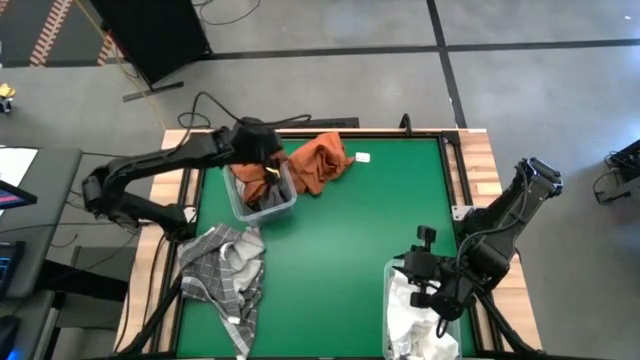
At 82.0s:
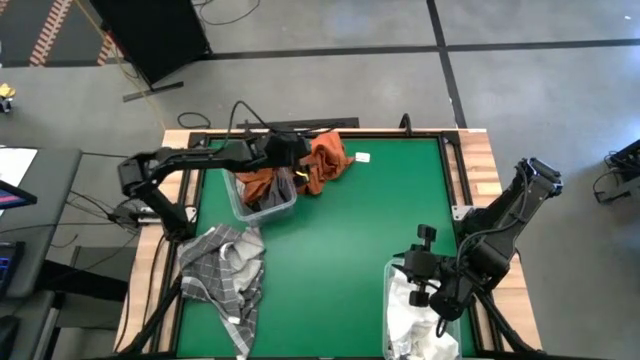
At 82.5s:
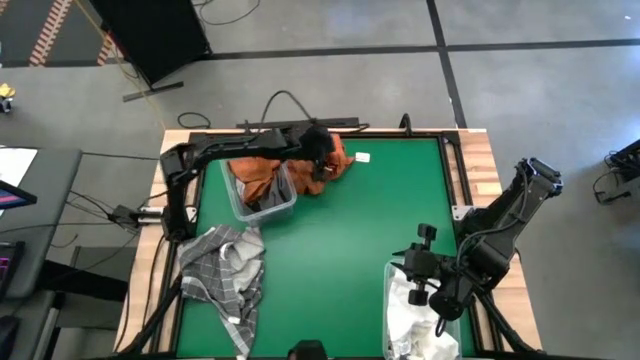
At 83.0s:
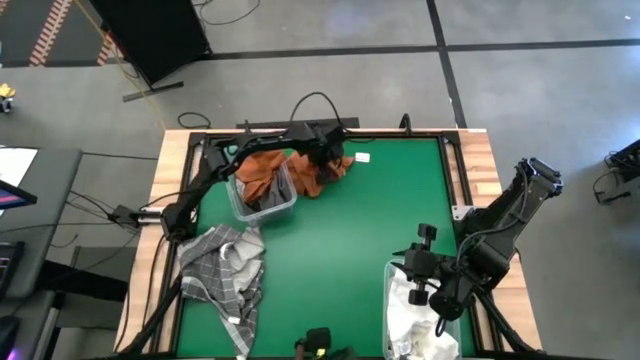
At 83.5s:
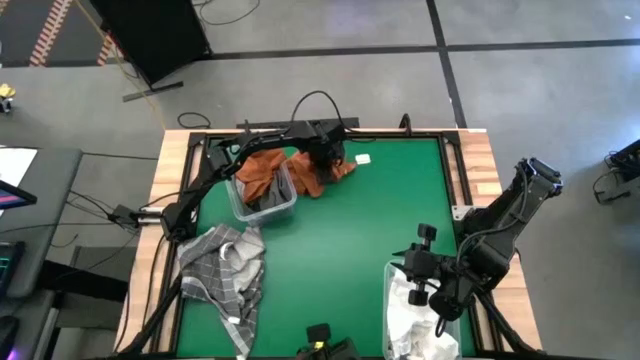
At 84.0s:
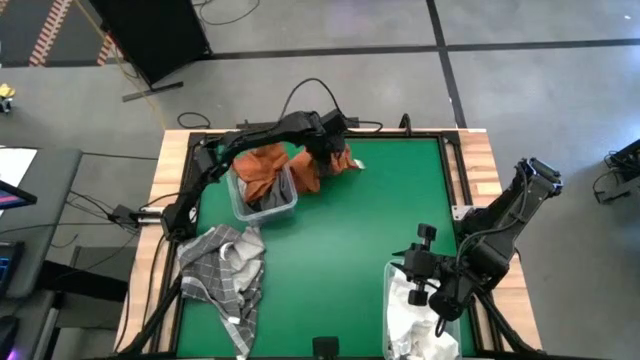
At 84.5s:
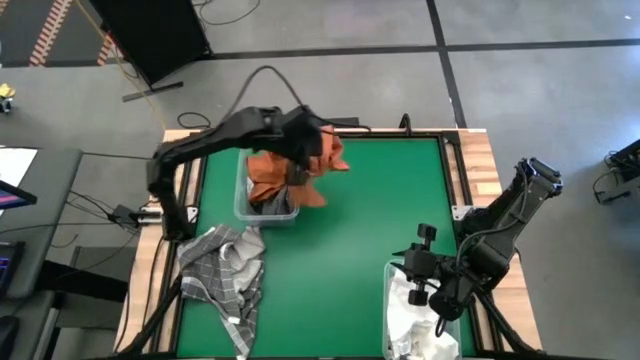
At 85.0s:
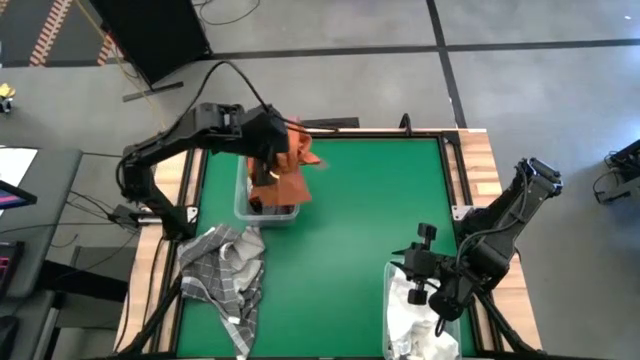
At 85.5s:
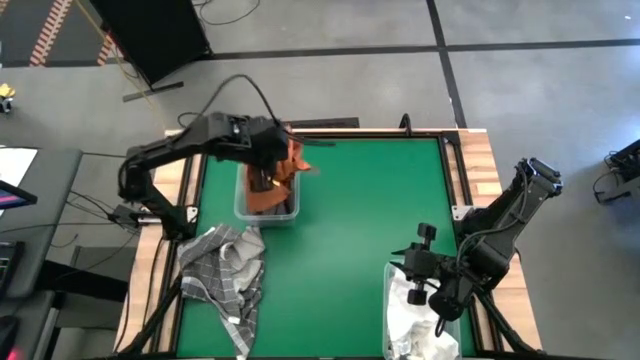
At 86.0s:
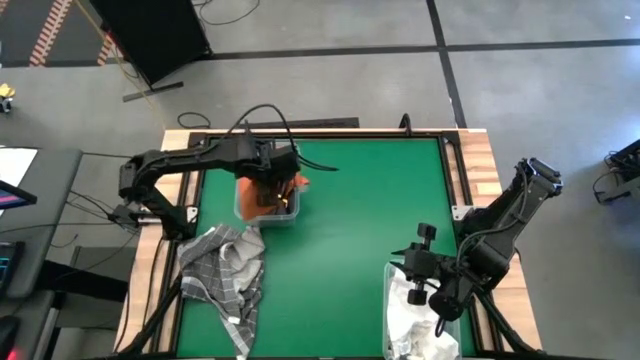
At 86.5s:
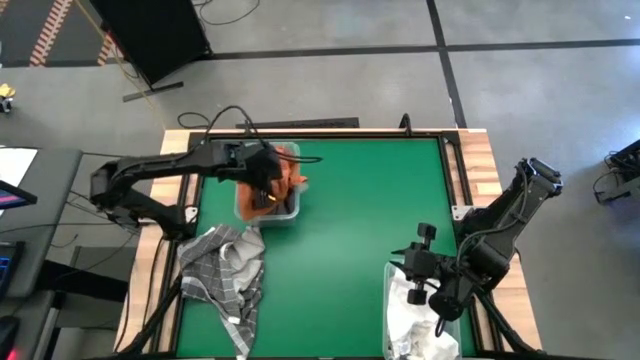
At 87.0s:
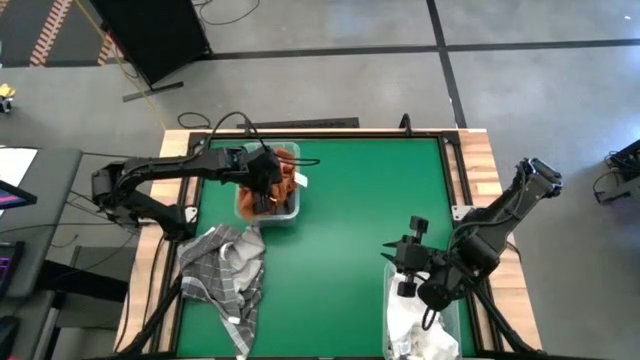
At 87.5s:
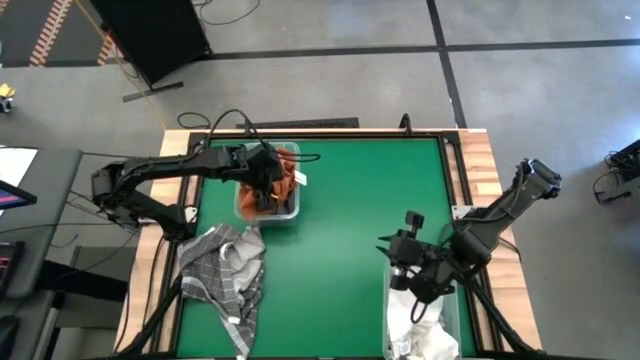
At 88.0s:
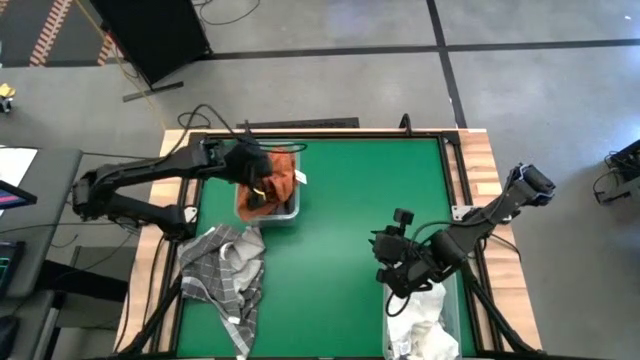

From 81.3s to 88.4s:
Task: Sort towels by color in basket
Put the orange towel into the top transparent bin

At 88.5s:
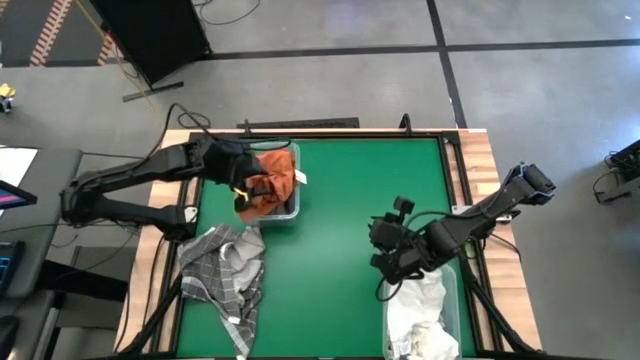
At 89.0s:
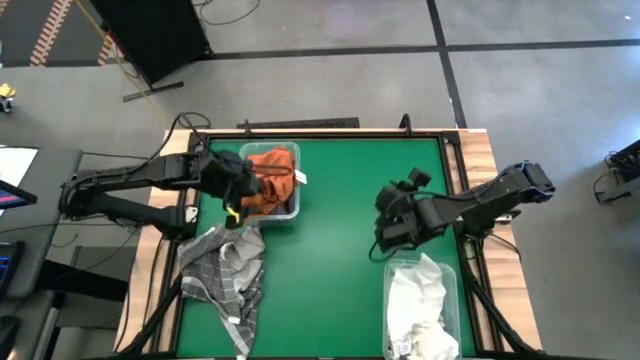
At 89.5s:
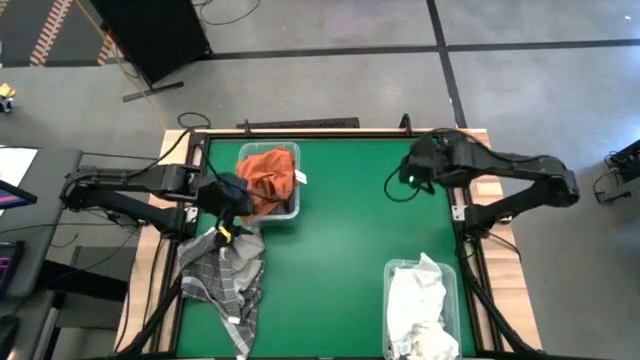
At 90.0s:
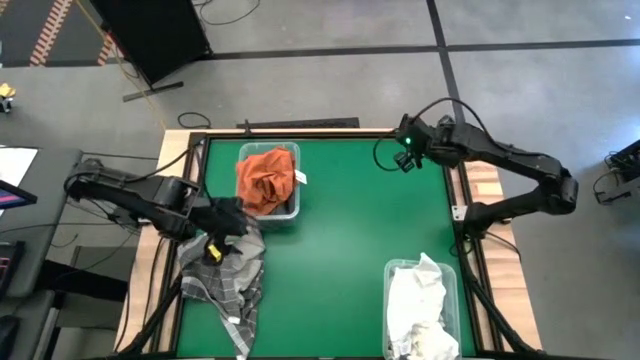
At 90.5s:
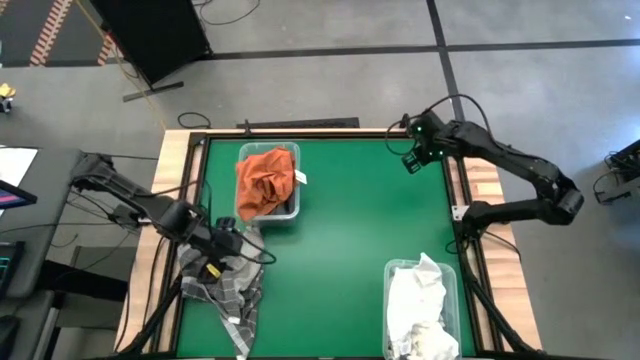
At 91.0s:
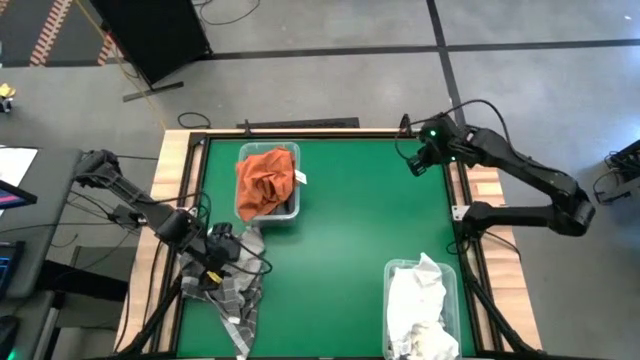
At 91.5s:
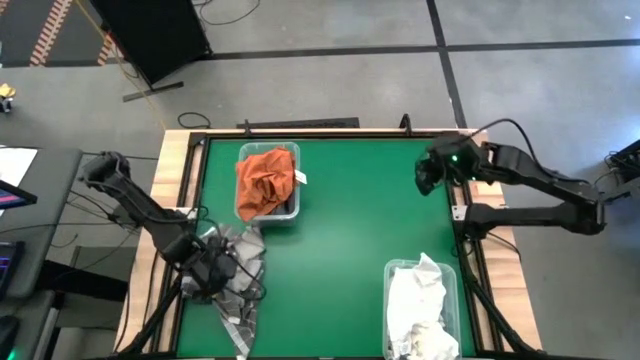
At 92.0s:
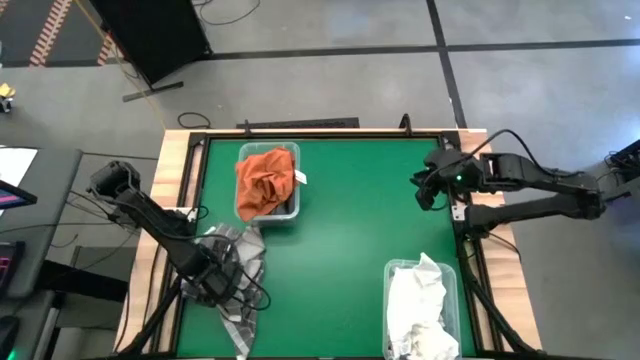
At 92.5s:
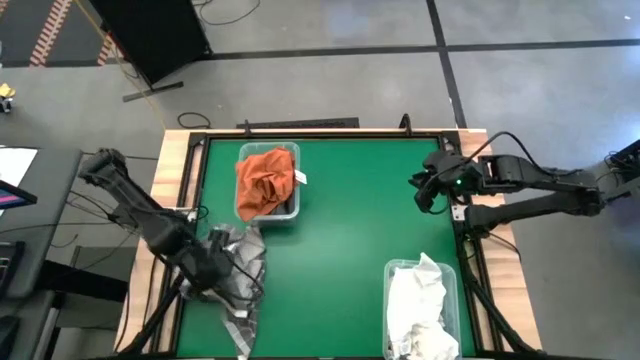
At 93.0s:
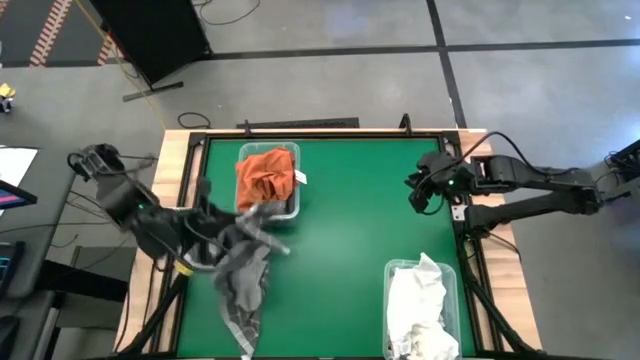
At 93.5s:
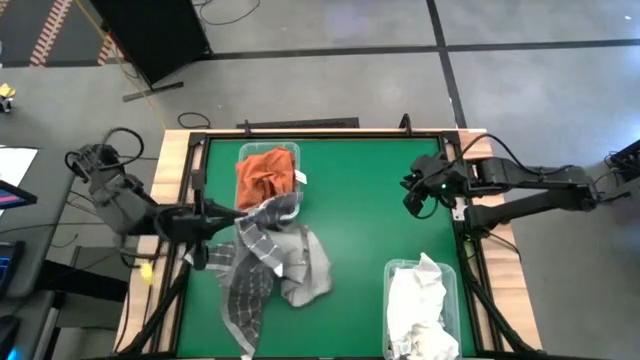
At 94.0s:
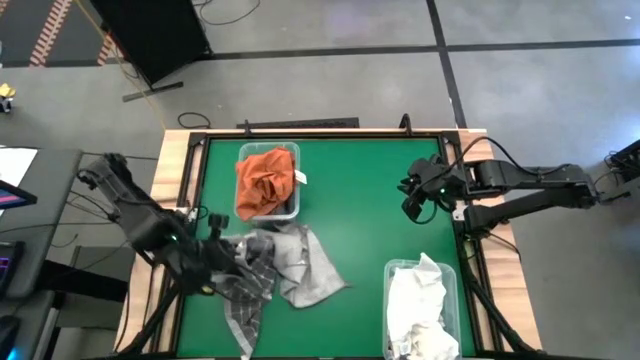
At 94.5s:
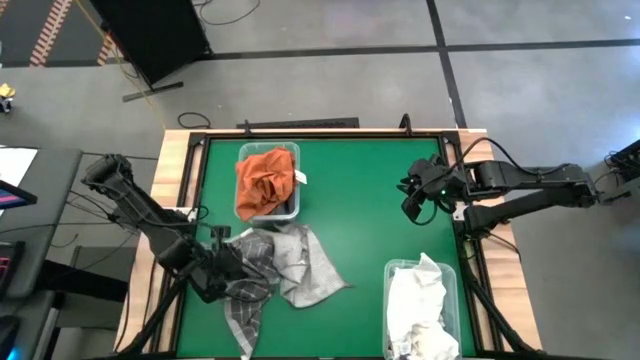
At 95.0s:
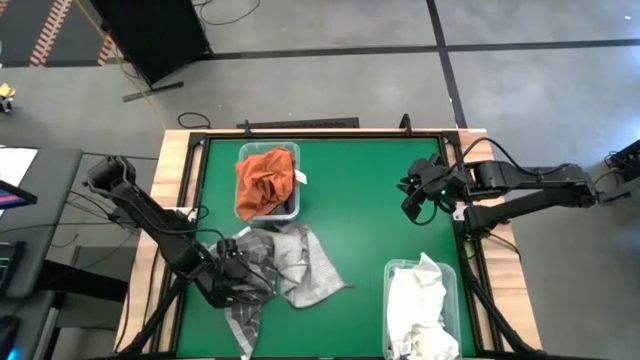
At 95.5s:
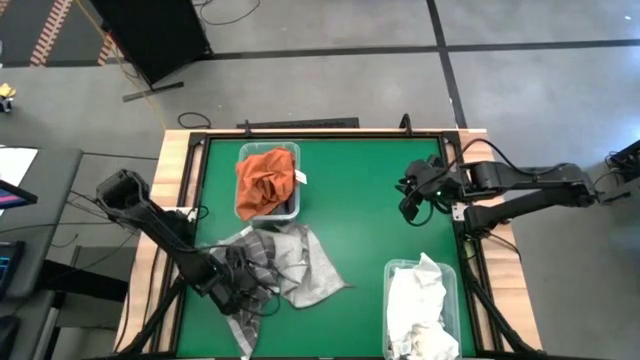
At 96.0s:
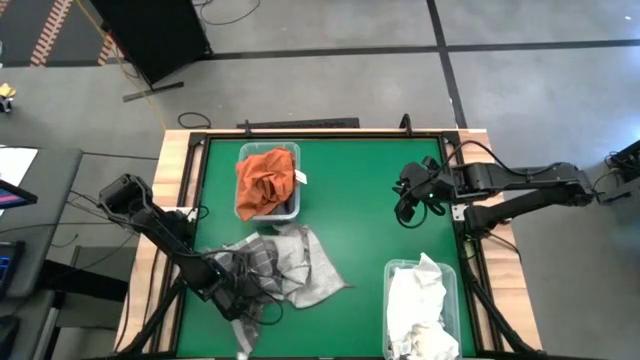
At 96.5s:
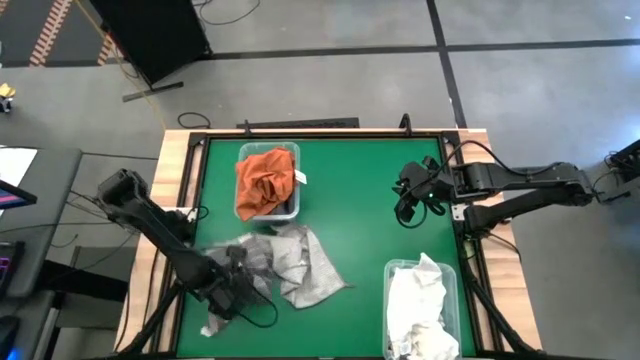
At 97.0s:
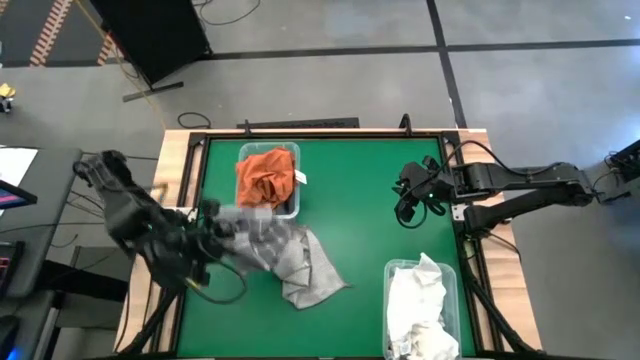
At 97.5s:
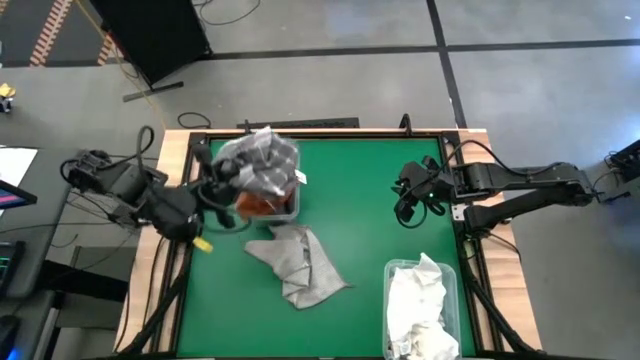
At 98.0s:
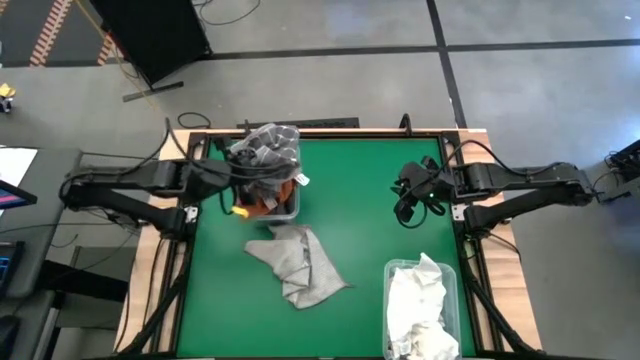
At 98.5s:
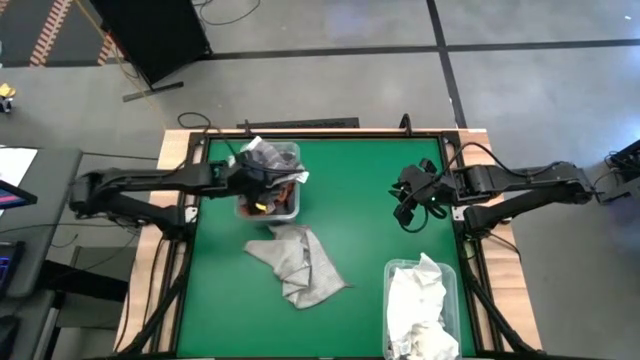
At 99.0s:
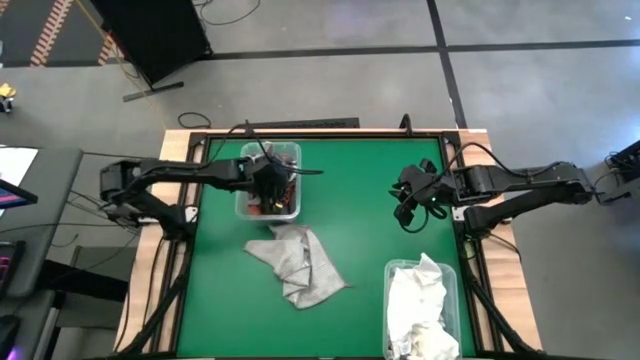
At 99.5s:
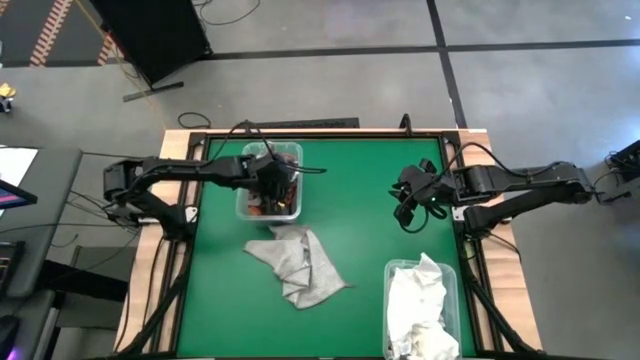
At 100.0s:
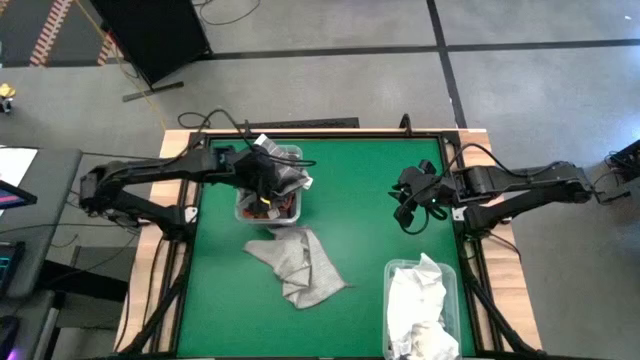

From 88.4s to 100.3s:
Put the gray patterned towel into the top transparent bin

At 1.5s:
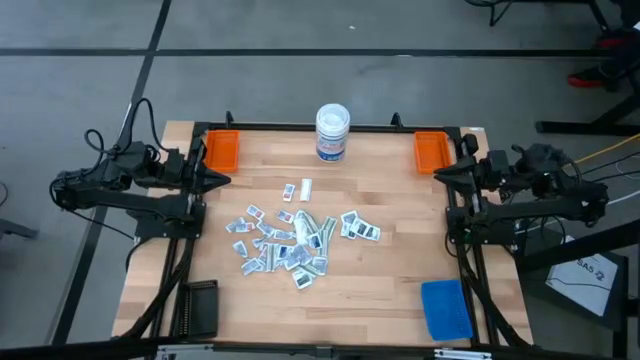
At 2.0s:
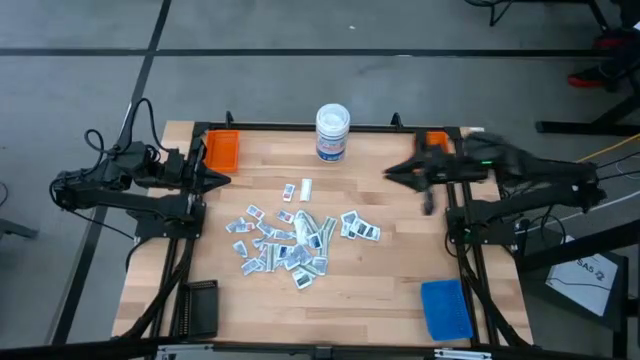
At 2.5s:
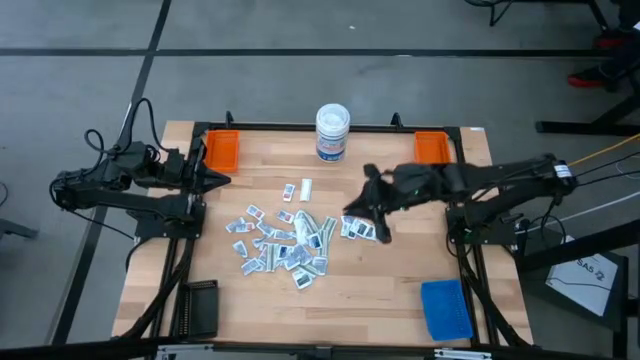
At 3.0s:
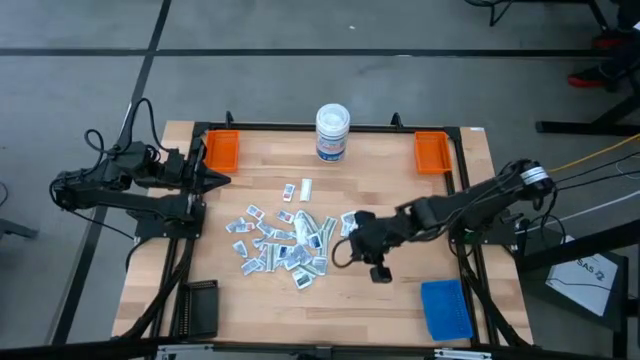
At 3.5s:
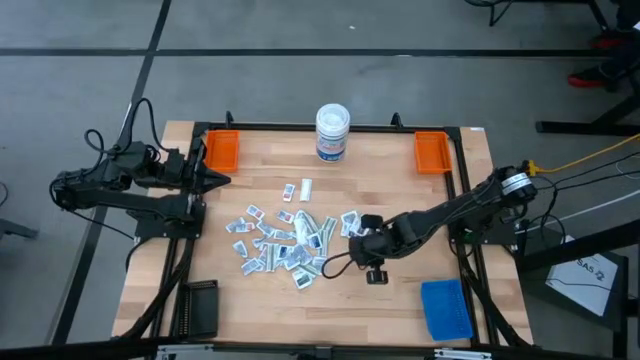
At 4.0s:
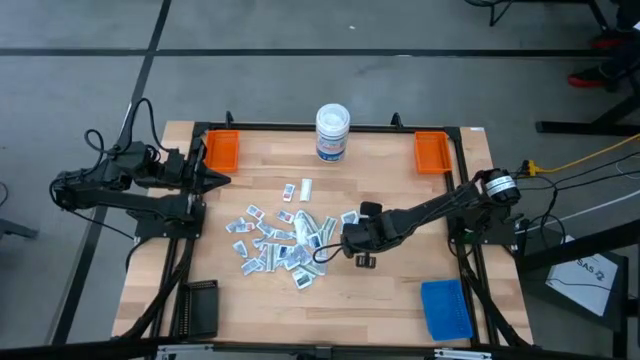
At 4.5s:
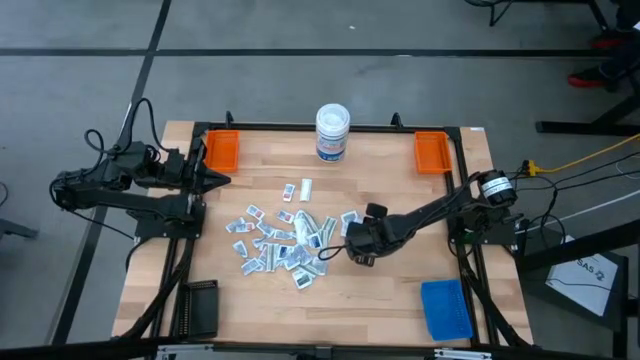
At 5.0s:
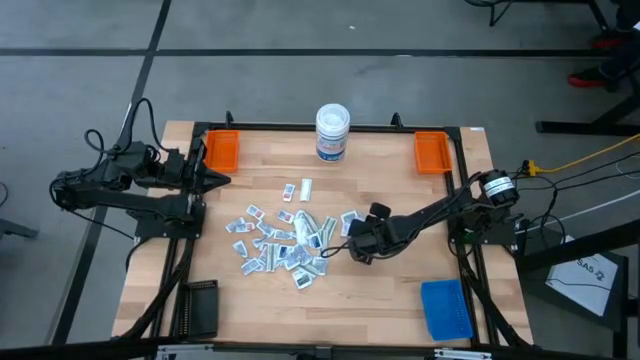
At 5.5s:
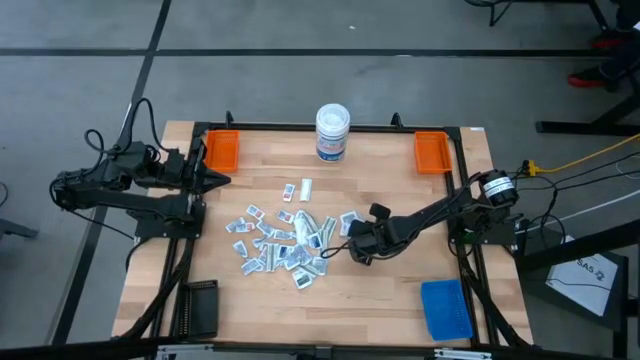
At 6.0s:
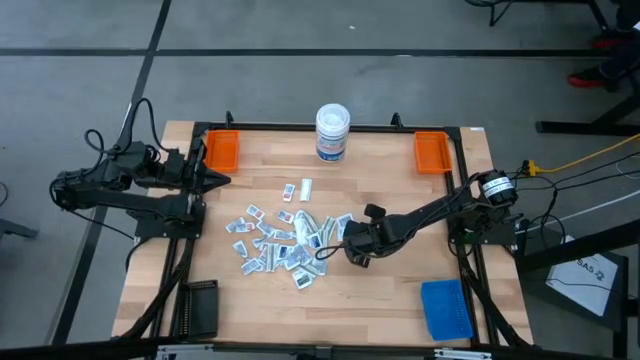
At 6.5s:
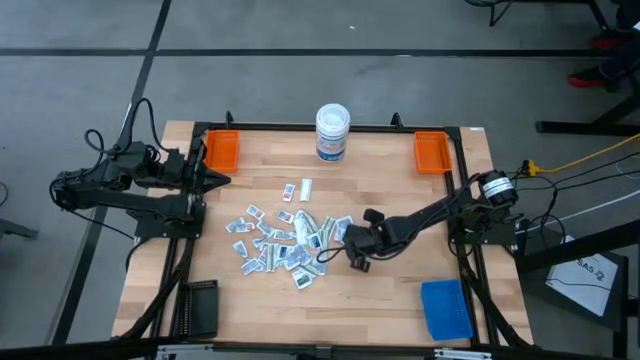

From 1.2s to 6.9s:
Task: Pick & Place First Aid Supplies
Put the gray towelette pack into the right orange bin
